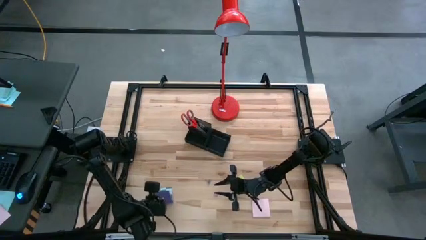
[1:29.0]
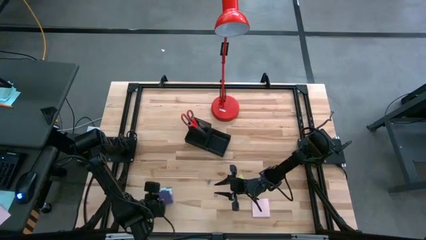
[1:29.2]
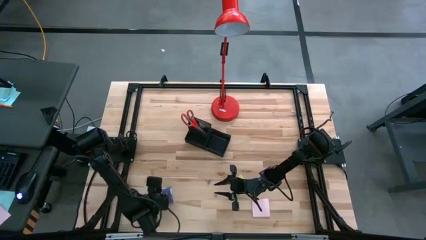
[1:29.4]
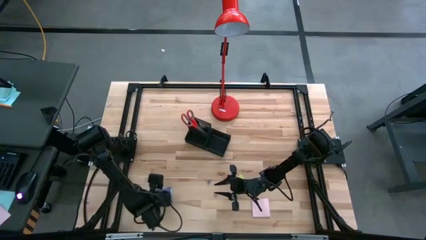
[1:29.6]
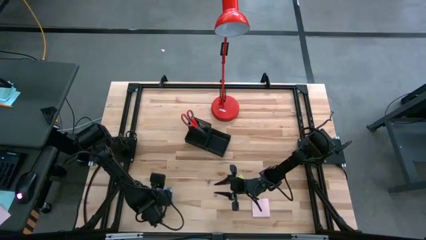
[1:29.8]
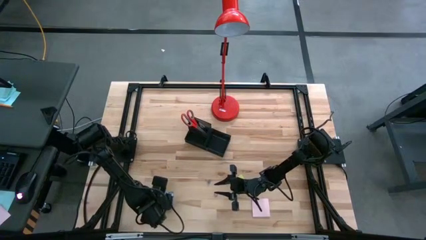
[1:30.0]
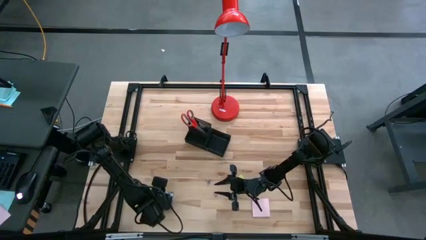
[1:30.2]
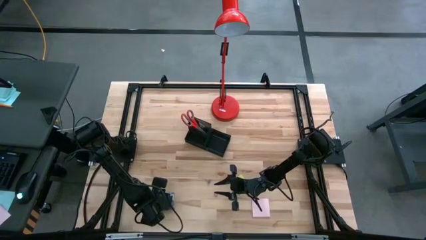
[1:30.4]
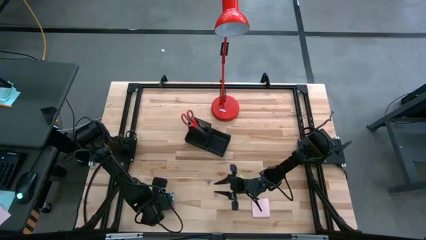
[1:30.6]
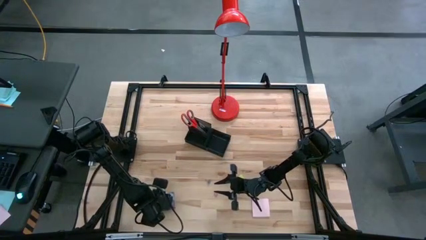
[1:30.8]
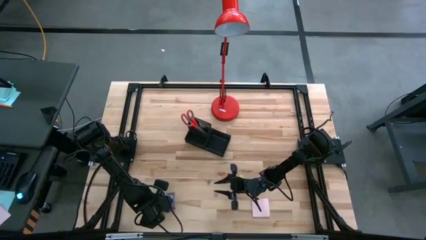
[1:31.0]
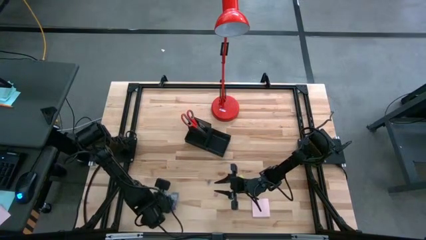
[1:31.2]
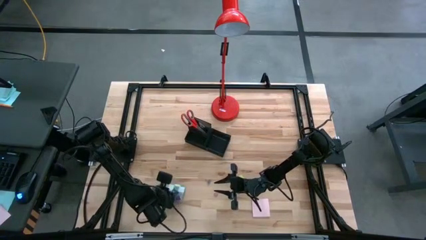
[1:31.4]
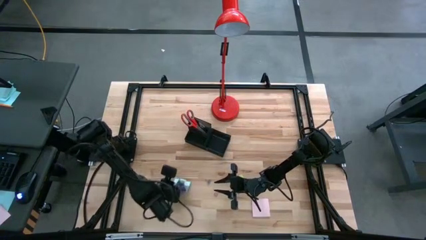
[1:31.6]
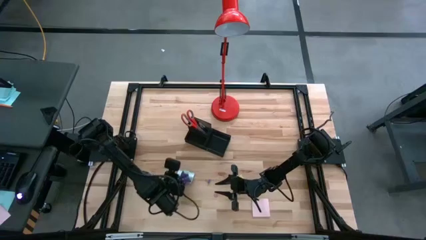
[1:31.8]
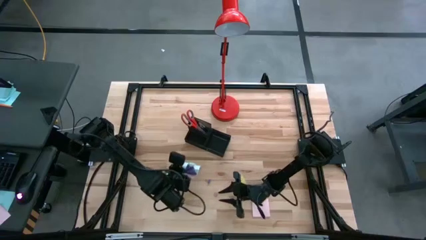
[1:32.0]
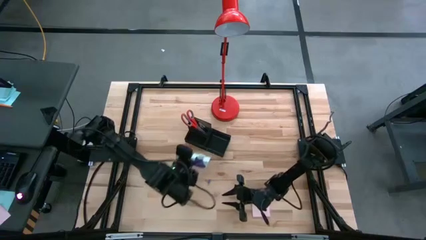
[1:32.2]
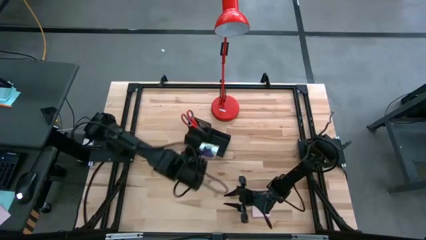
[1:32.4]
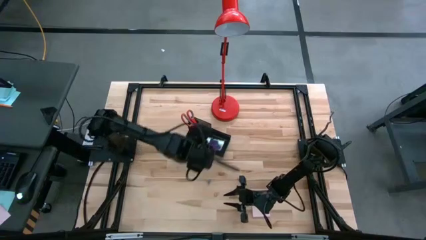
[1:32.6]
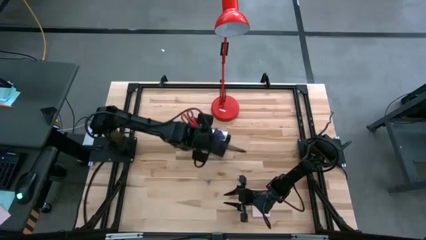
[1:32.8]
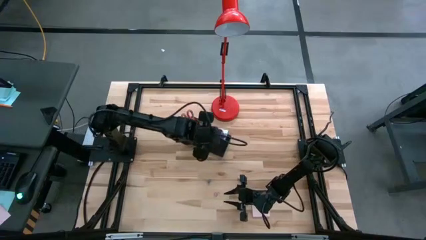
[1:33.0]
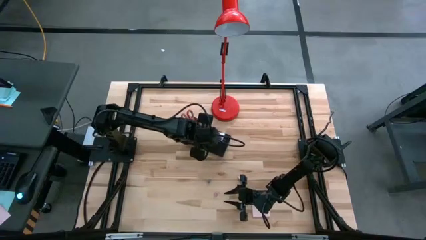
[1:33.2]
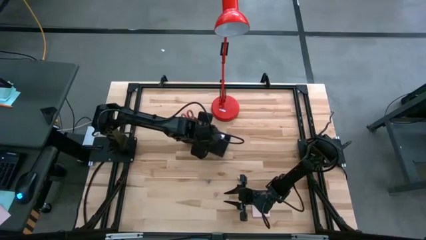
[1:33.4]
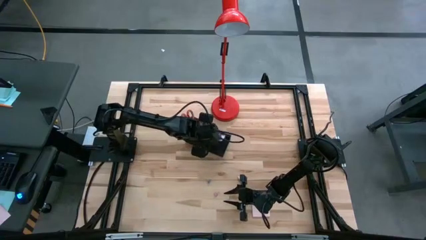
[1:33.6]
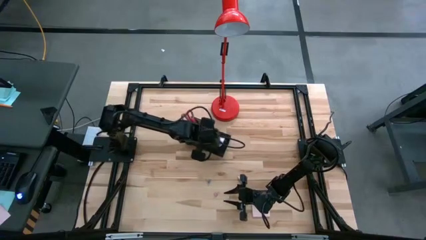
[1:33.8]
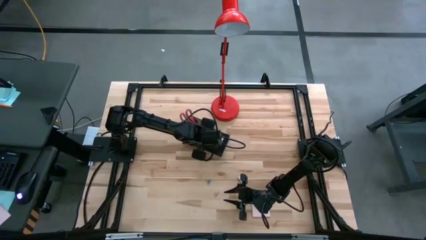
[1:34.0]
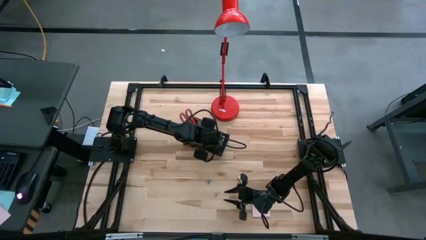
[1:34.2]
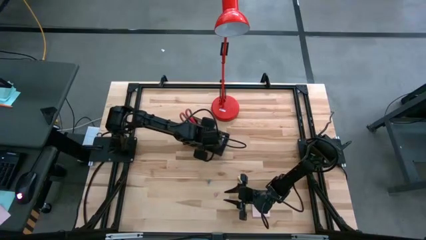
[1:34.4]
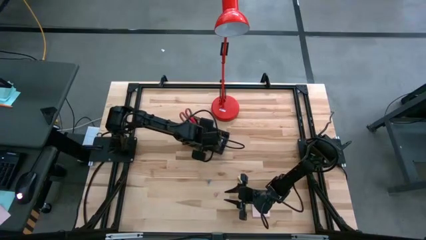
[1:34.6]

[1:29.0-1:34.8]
Task: Pick and place office supplies into organizer
Put the purple sticky note into the desk organizer

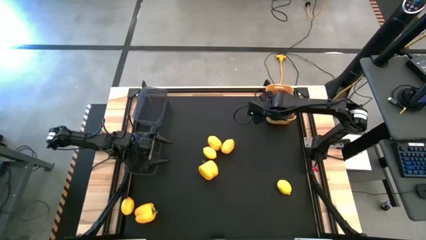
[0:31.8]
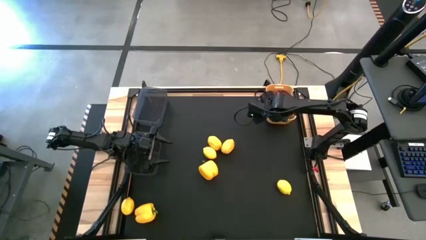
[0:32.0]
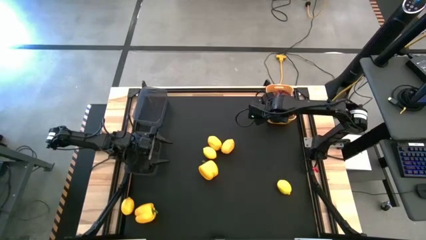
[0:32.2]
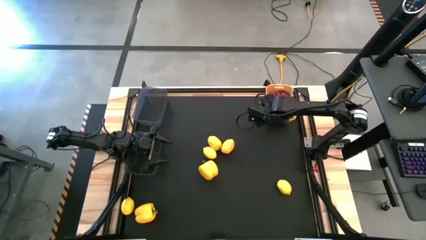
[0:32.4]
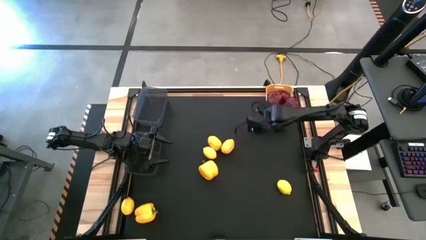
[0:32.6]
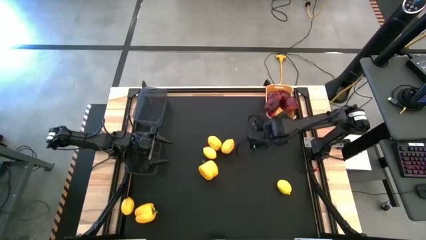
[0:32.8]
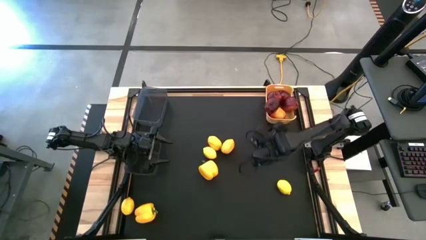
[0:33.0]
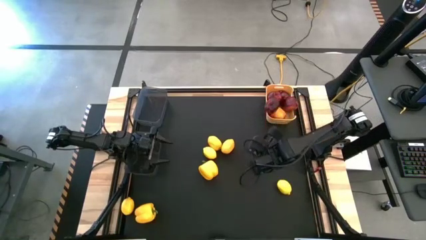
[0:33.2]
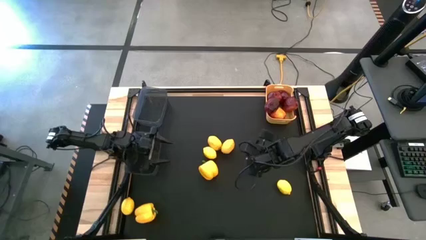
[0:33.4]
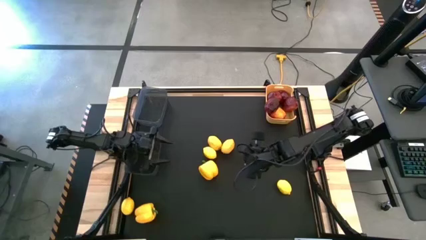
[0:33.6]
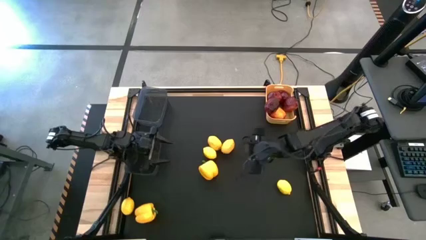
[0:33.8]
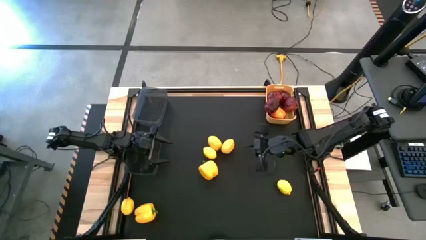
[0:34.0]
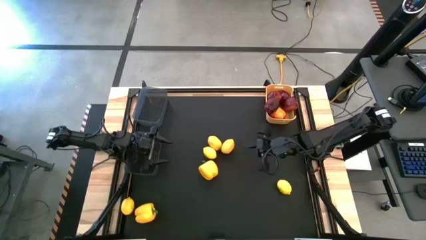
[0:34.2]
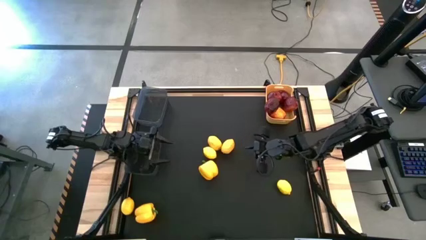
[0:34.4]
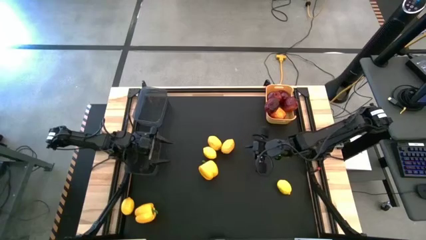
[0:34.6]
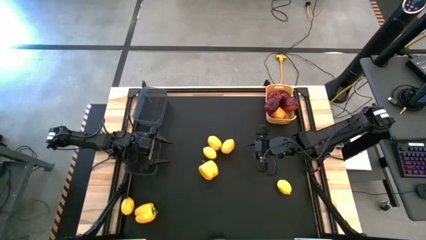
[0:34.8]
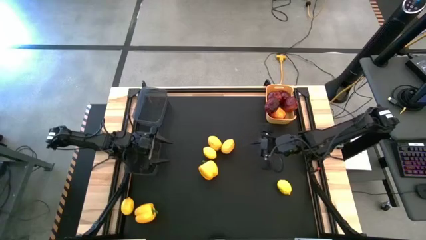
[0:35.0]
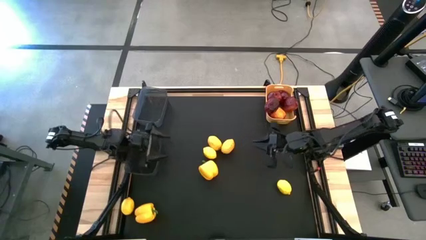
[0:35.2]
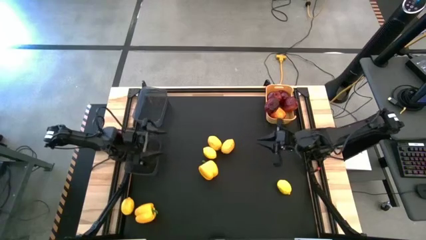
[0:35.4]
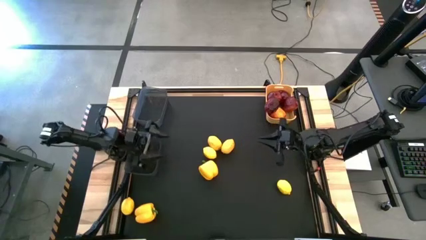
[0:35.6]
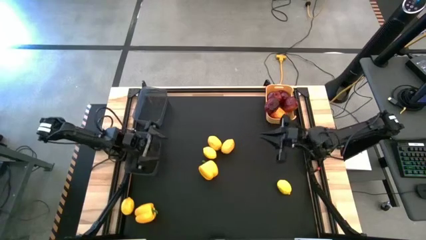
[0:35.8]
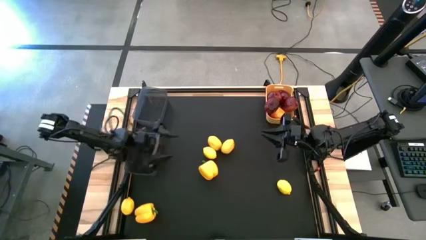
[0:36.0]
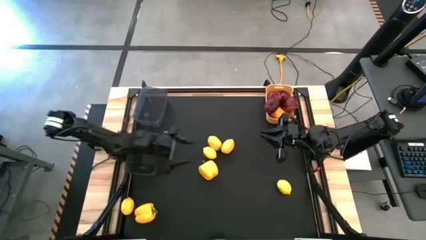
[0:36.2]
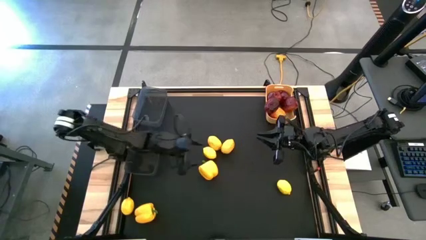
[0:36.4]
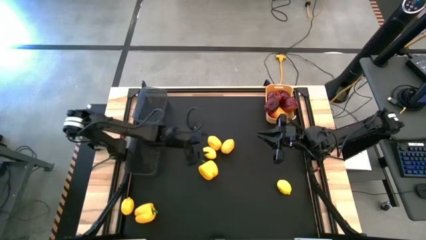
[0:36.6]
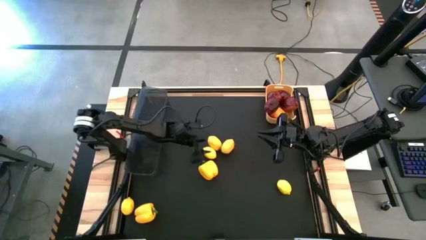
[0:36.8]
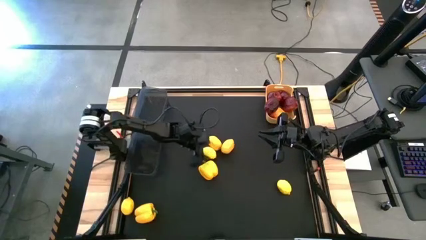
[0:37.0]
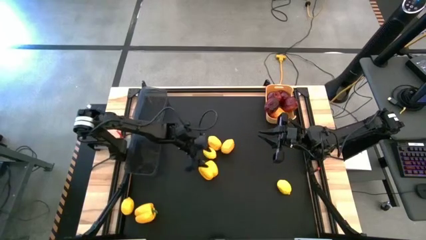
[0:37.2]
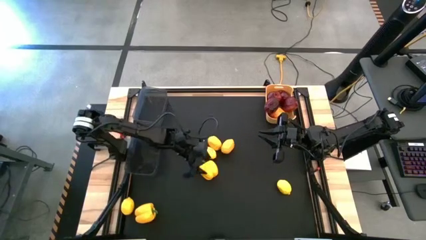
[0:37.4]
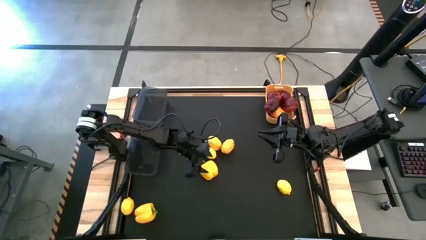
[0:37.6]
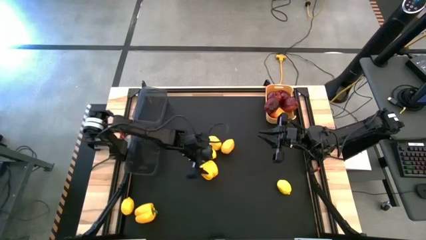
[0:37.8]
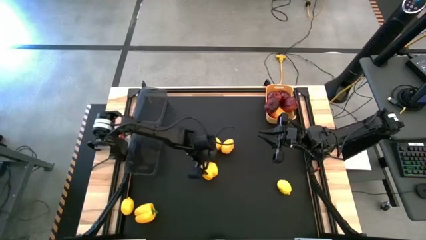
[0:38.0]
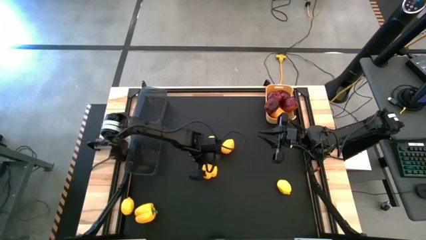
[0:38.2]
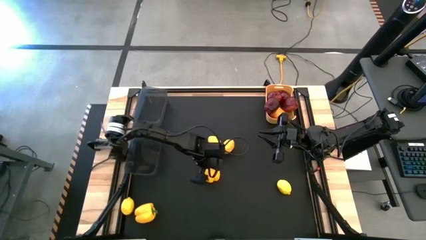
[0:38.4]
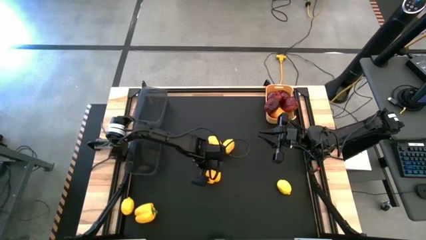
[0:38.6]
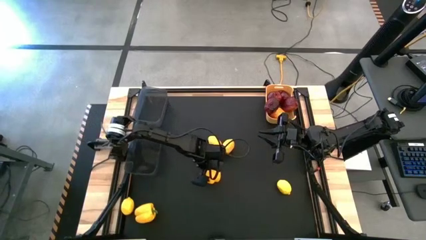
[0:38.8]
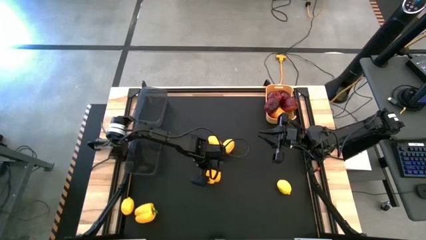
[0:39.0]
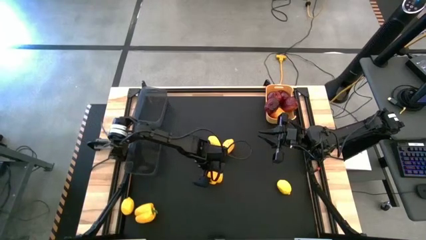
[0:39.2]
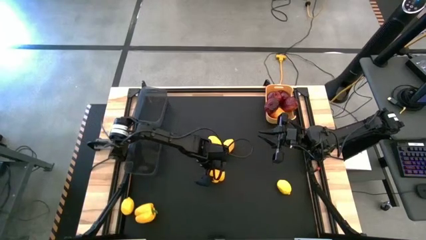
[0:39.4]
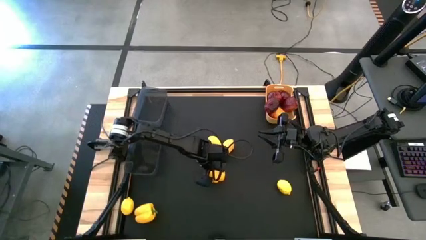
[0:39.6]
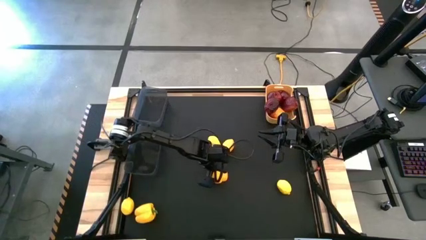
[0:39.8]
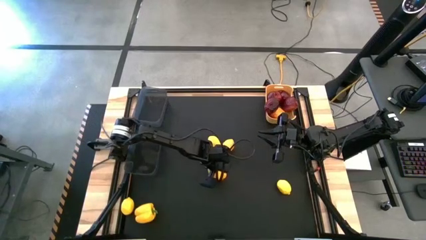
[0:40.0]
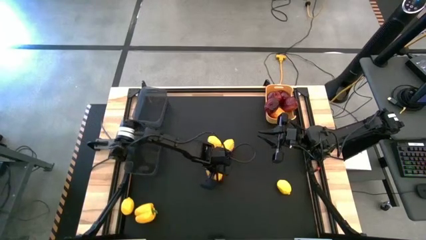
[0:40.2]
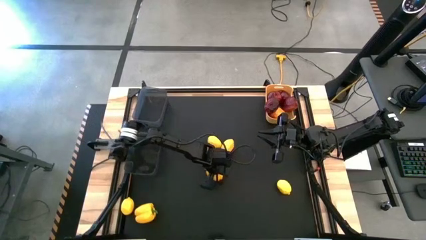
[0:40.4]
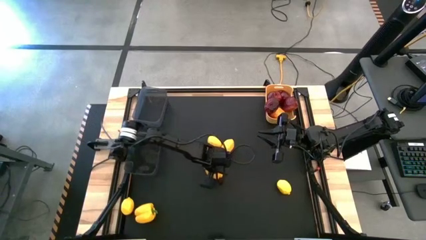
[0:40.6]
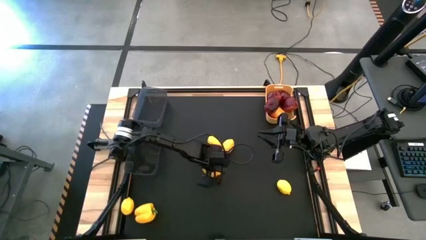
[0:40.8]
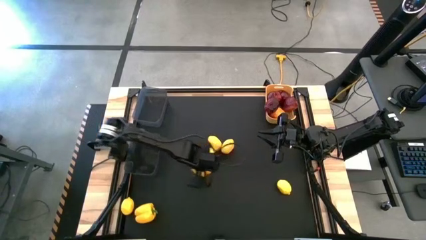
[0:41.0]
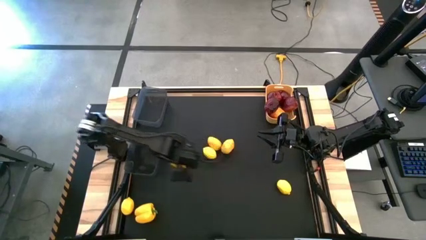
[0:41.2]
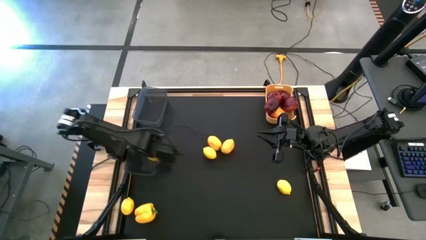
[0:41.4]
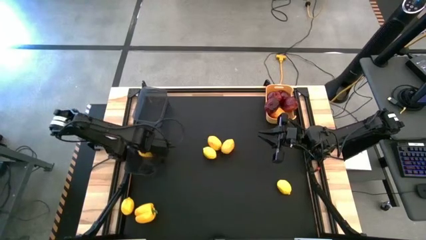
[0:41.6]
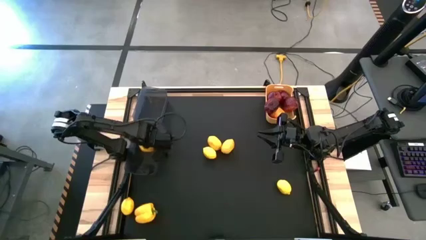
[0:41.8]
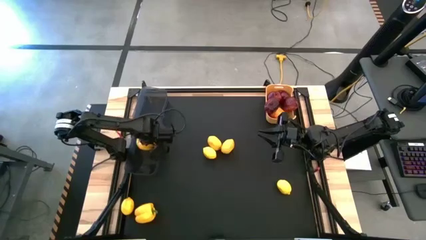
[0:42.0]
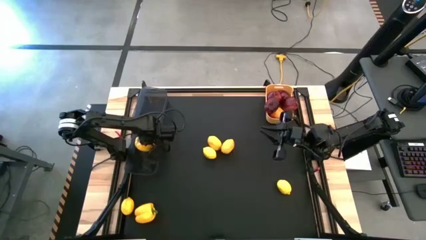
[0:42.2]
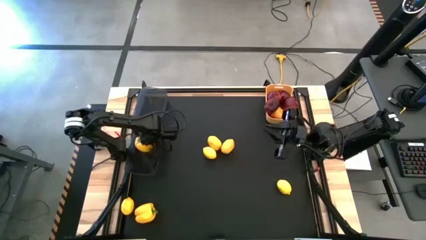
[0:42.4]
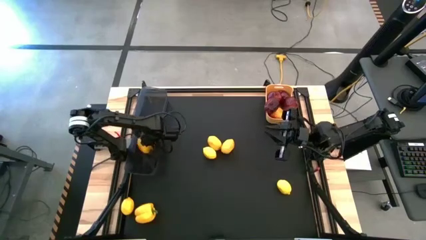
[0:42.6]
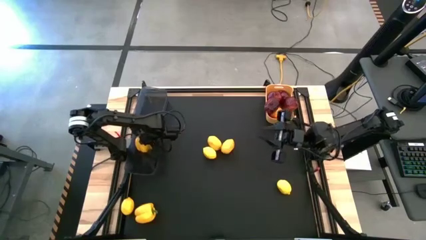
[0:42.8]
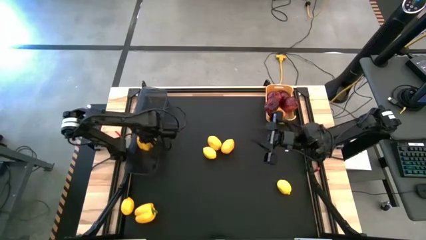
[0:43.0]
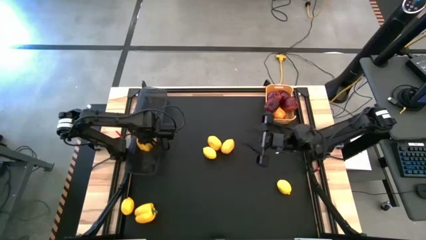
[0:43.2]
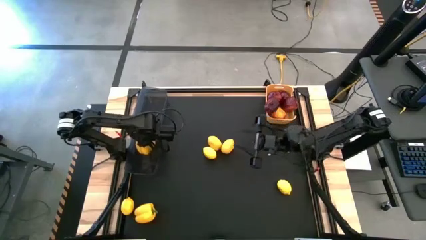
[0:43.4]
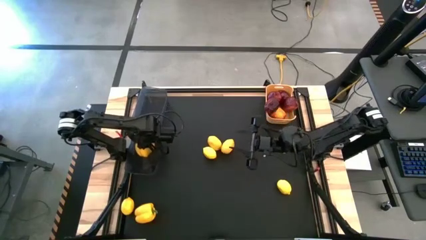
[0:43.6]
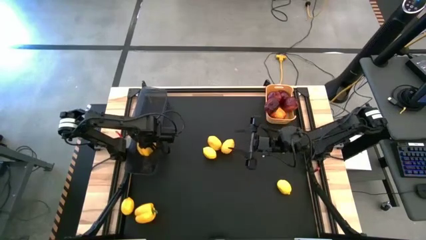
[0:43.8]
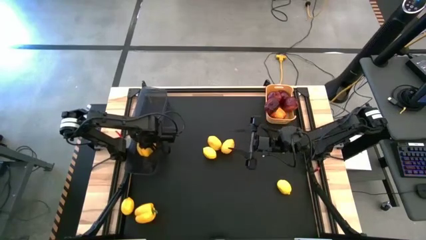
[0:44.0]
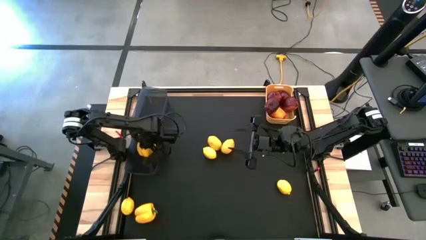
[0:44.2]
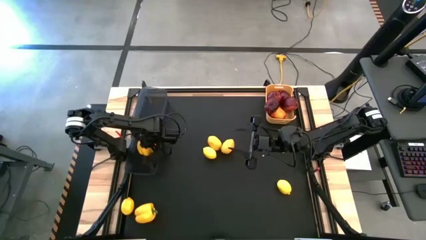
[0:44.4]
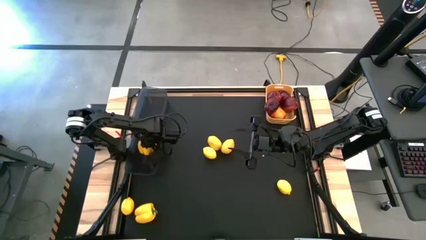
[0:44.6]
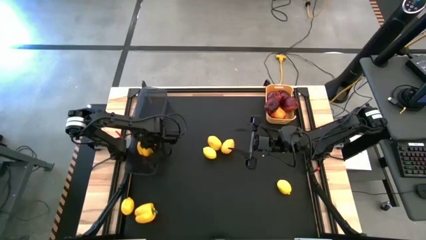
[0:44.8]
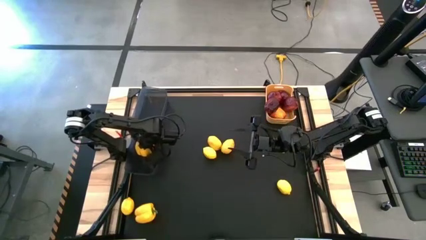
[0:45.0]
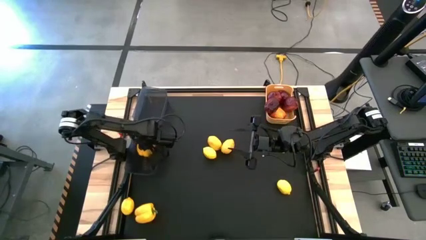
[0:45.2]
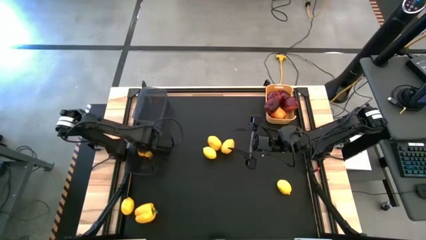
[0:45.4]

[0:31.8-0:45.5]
Task: Sort produce into baskets
Put the bell pepper into the bottom black bin
